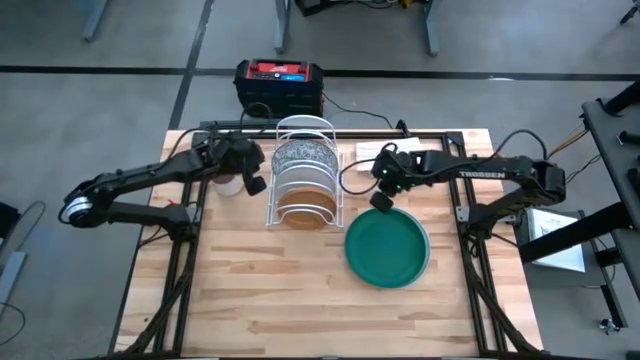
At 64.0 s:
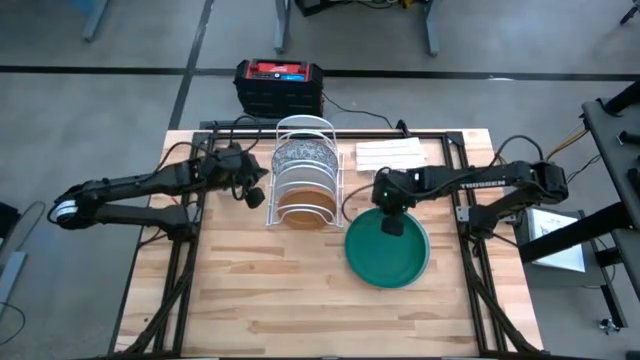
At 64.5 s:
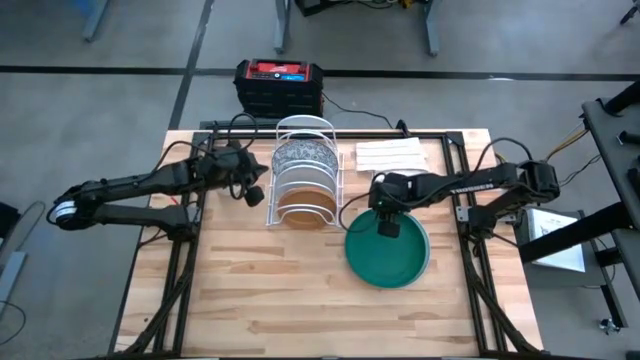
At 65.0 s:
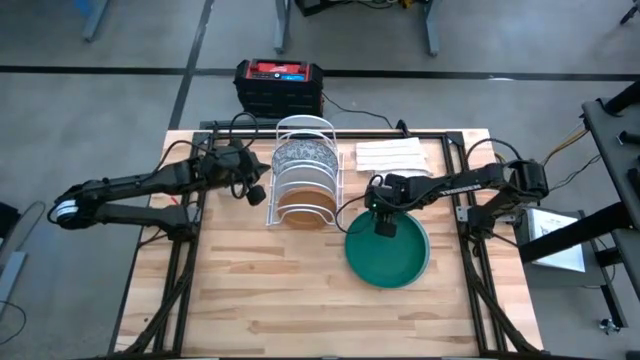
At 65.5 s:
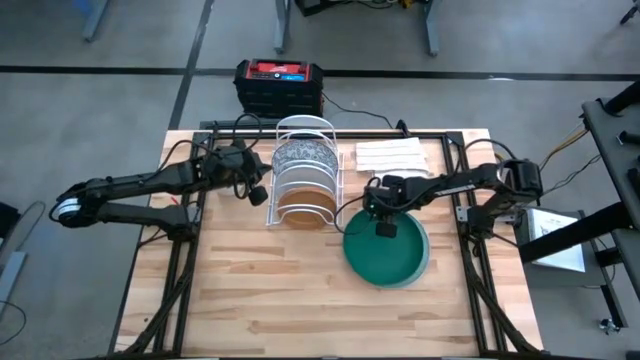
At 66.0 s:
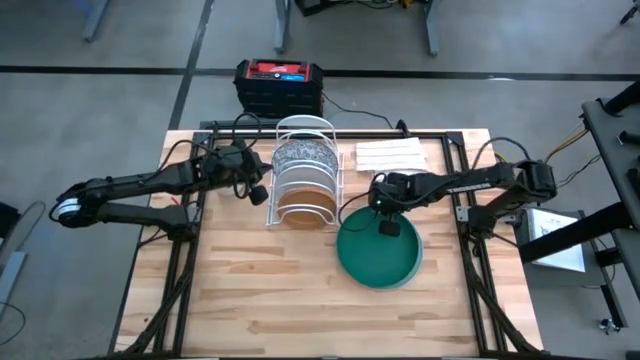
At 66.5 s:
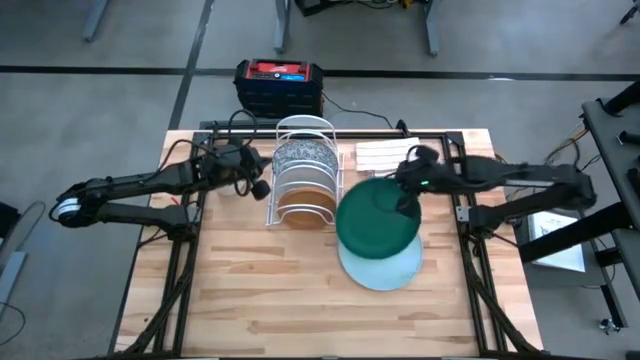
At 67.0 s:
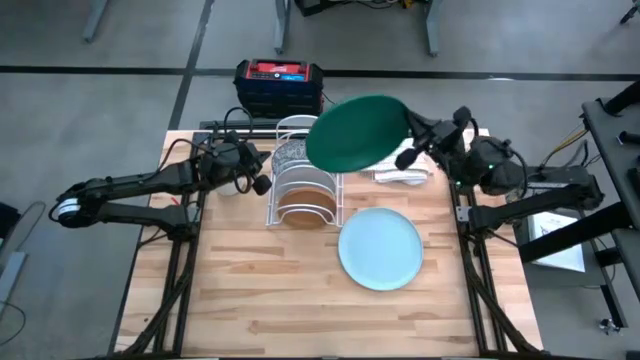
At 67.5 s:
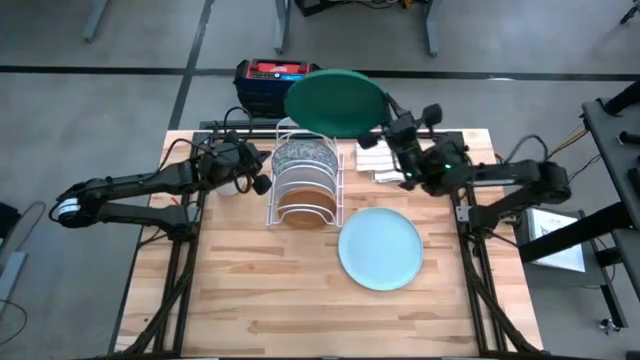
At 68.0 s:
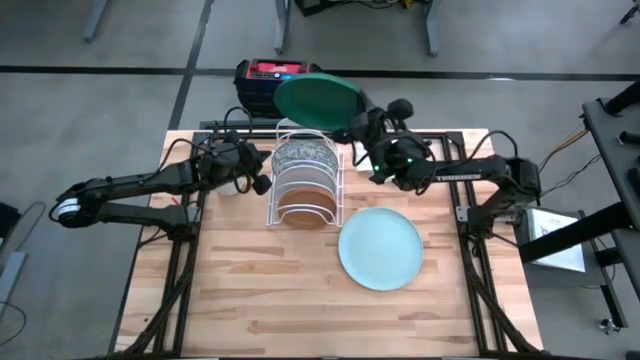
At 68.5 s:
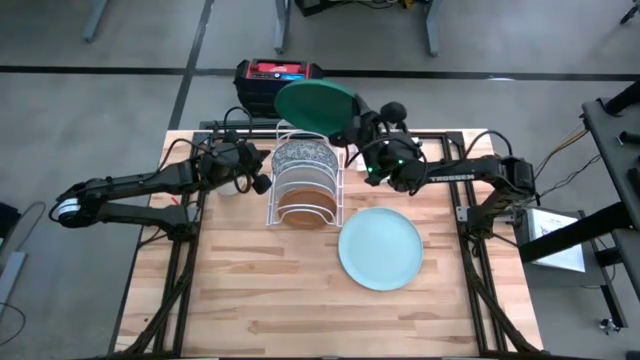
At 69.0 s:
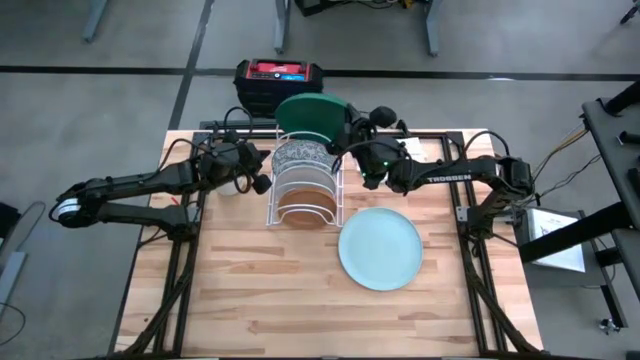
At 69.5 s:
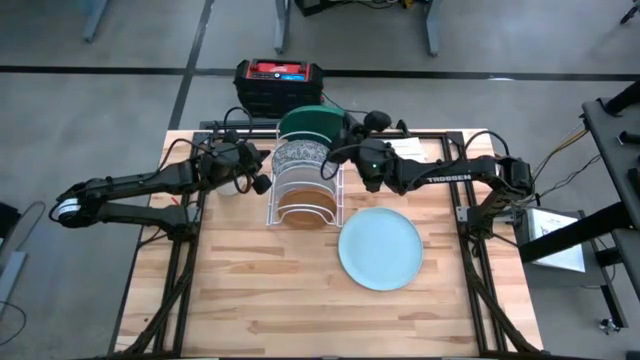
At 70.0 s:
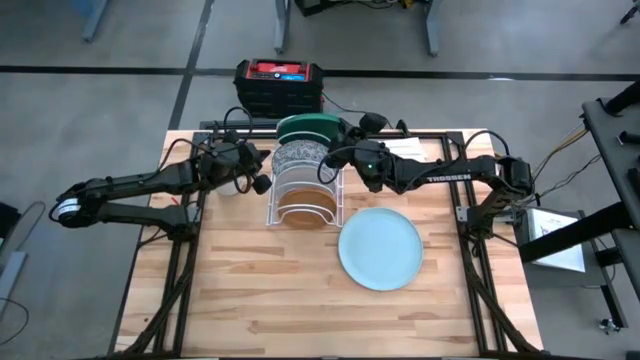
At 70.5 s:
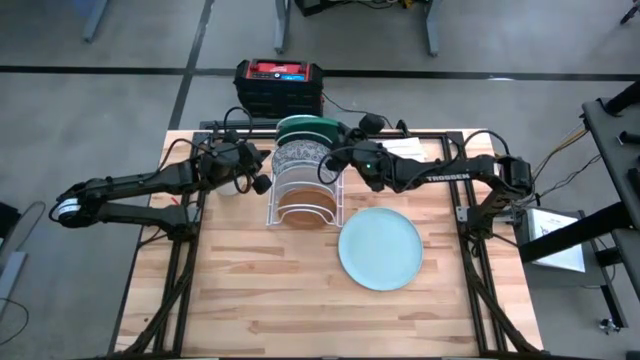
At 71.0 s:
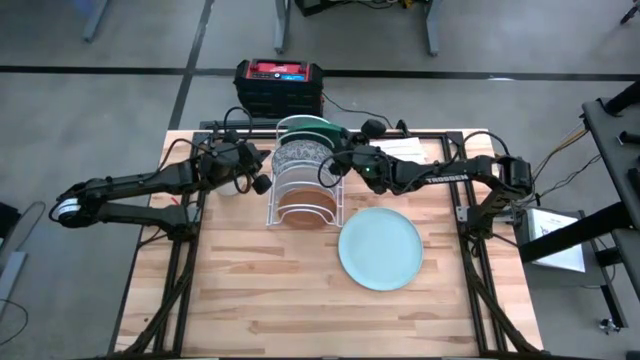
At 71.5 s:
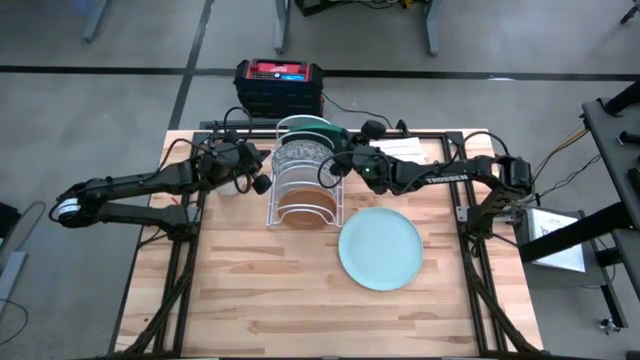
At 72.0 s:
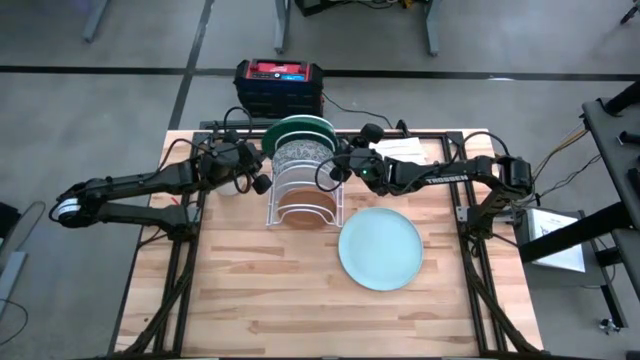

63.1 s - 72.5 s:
Task: Sort dishes
Put the green plate in the dish rack

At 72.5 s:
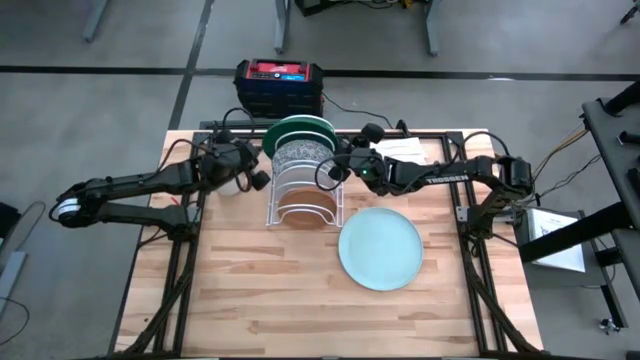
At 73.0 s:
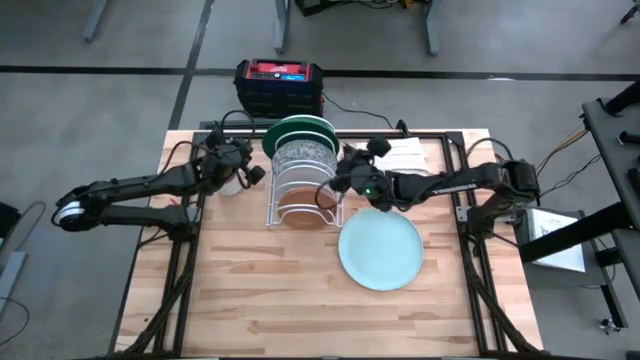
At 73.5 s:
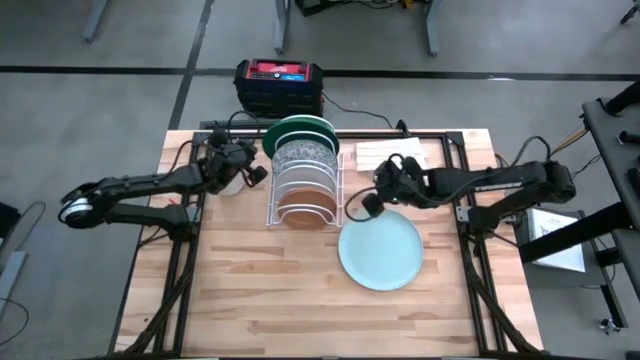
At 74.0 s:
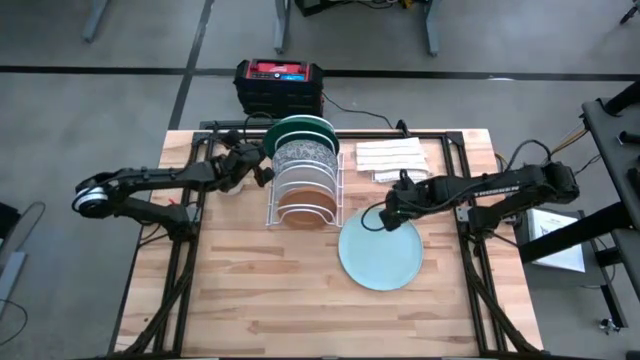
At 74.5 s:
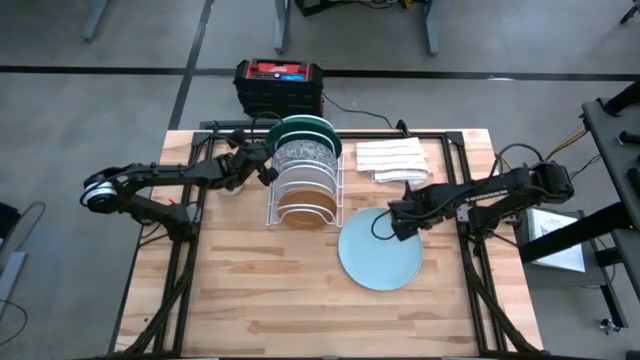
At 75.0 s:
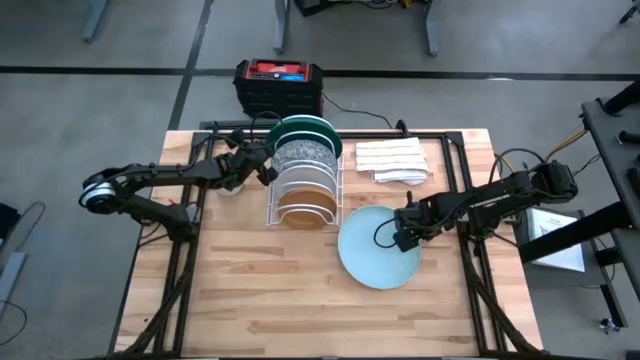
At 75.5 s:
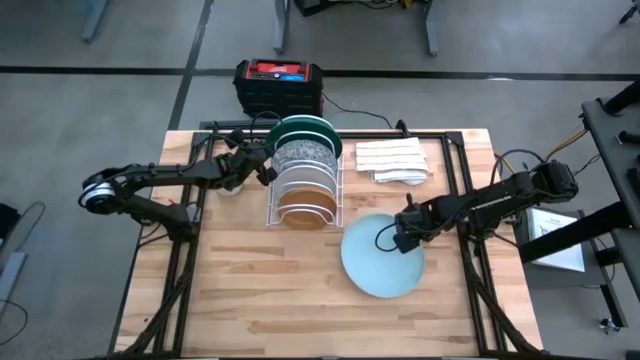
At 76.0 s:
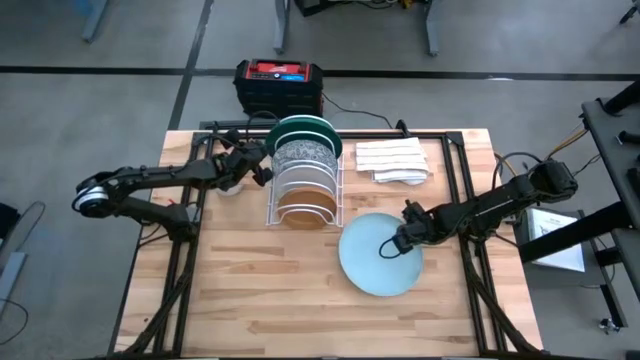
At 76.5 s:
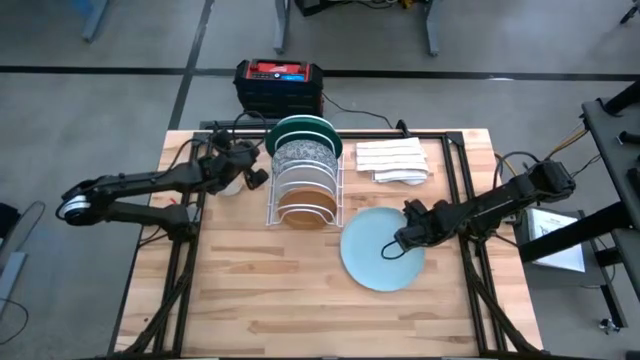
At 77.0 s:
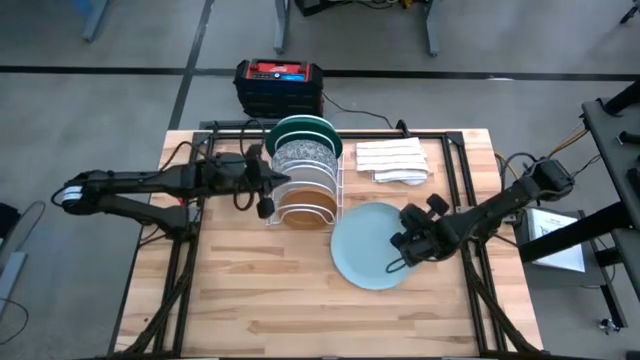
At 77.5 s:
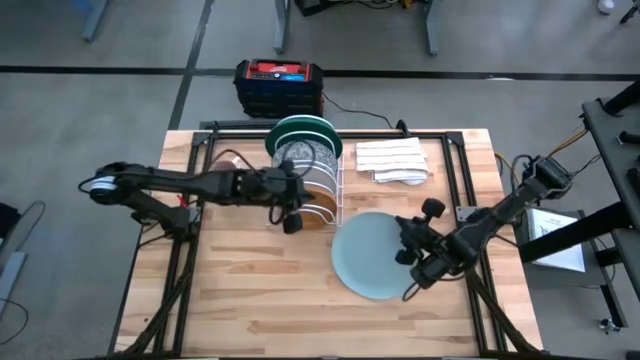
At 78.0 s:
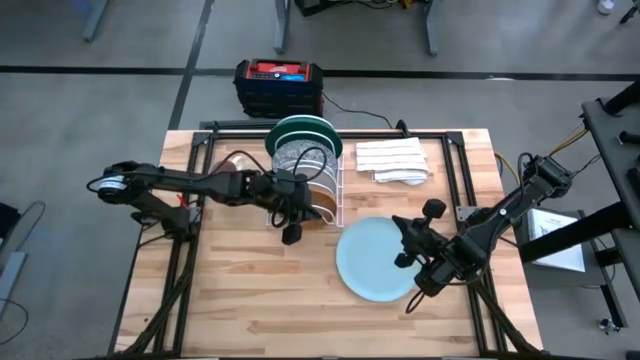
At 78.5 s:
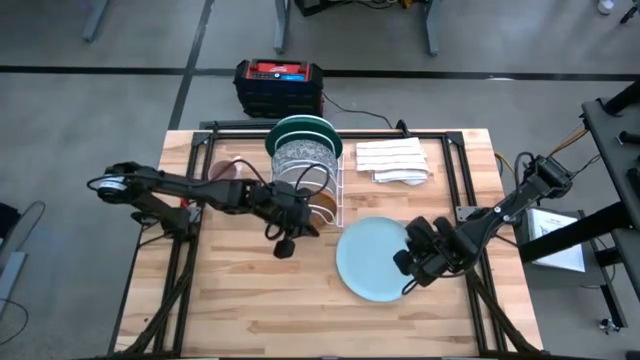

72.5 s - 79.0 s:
Put the light blue plate in the dish rack

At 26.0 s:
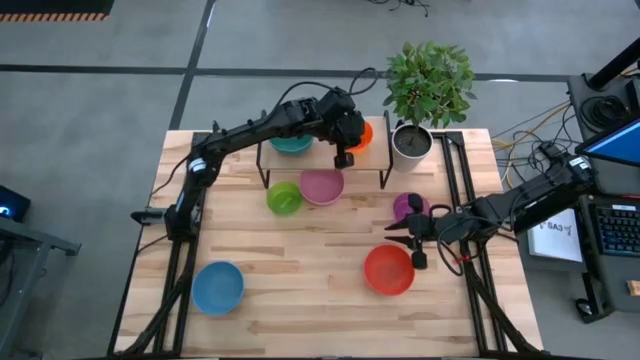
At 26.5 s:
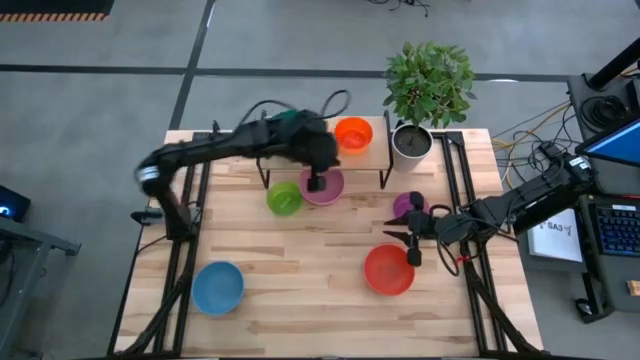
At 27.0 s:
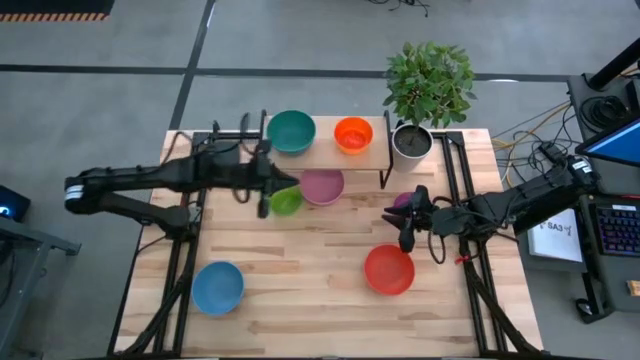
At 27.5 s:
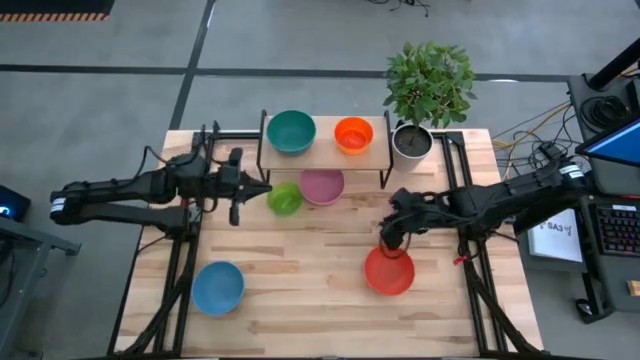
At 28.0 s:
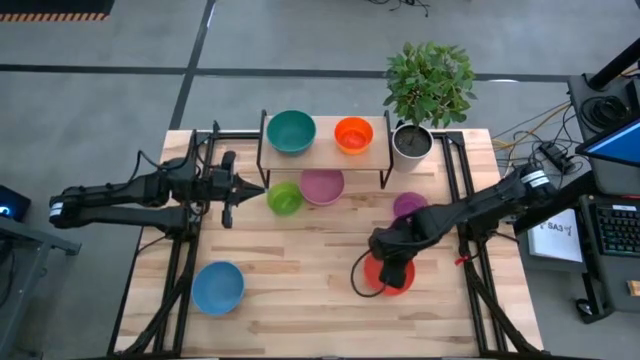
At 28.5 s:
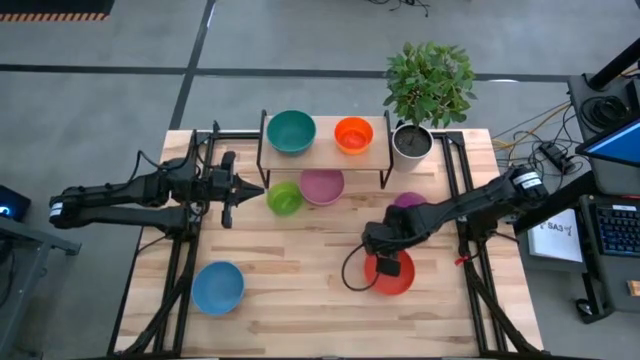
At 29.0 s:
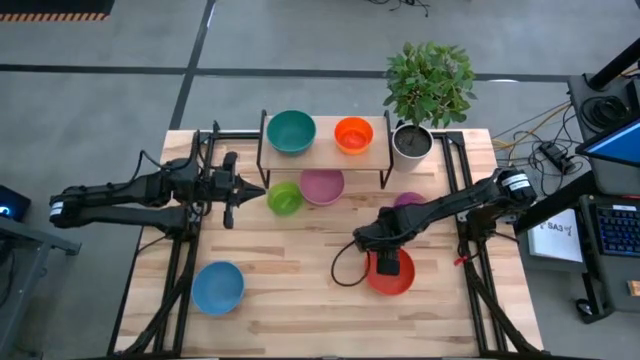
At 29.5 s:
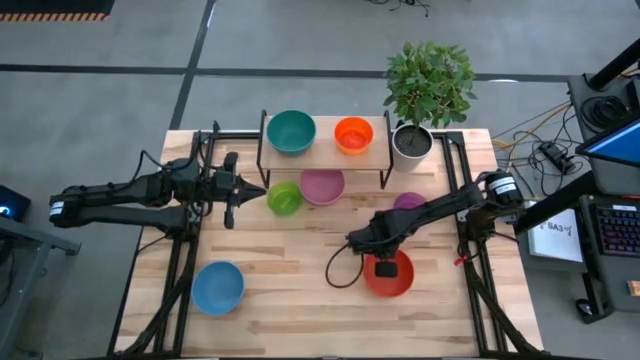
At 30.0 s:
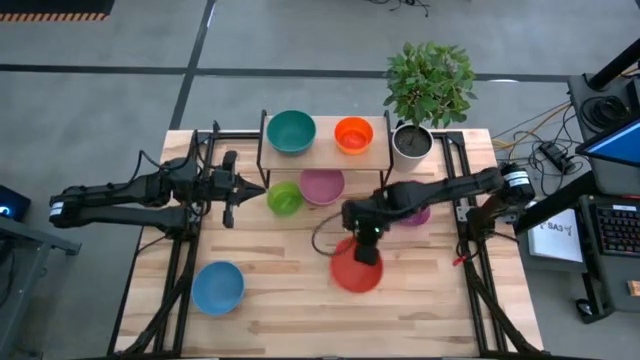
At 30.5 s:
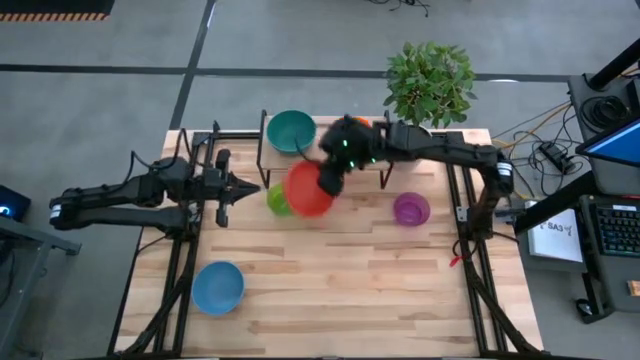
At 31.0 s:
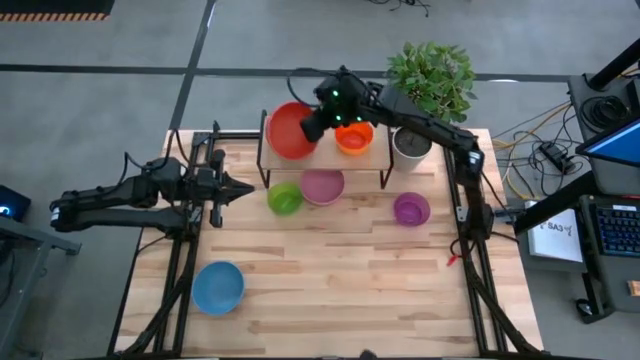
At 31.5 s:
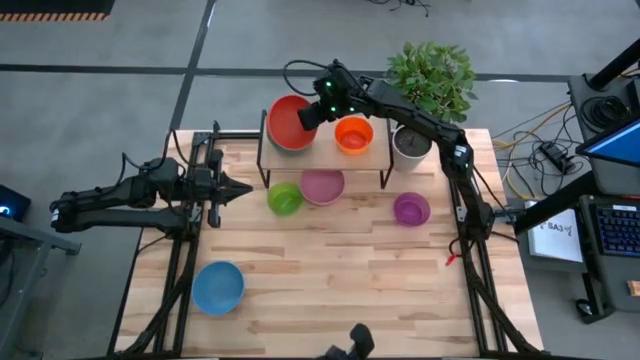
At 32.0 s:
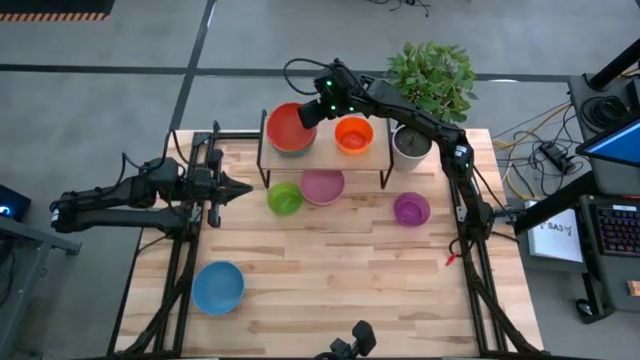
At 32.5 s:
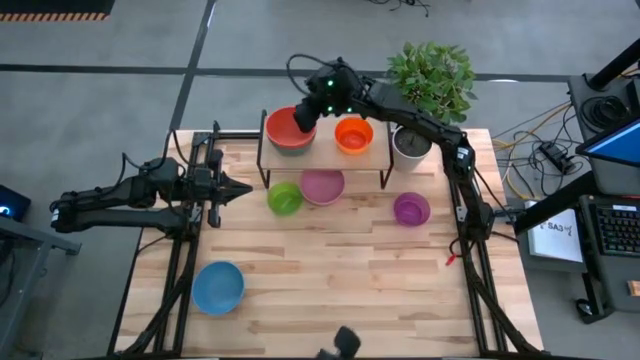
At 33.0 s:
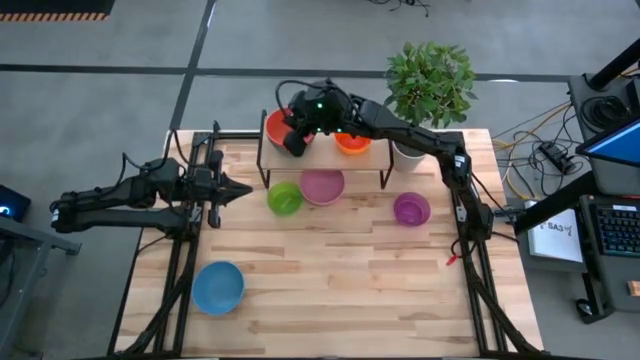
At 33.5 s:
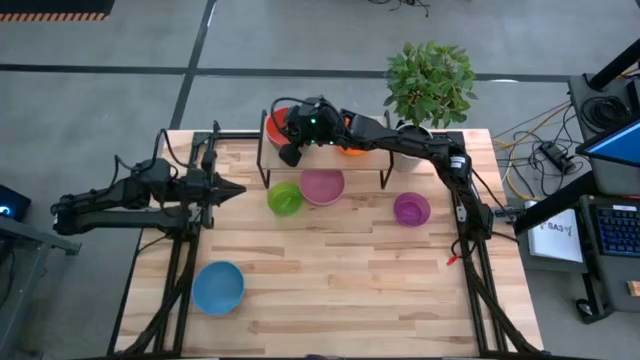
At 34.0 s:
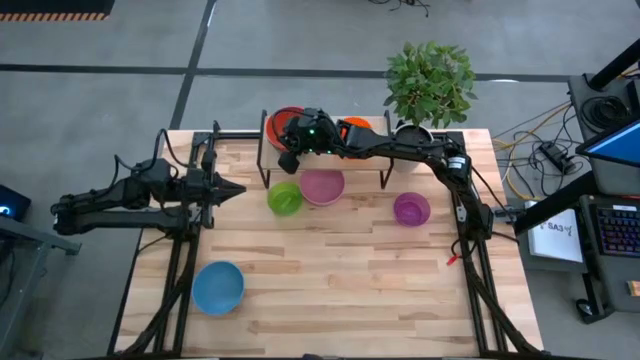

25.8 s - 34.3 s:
Task: Place and stack bowls onto a shelf
Stack the dark orange bowl on the dark green bowl on the shelf
